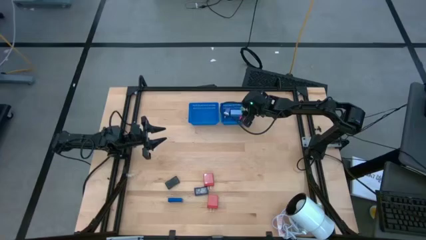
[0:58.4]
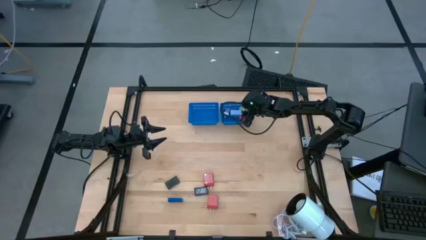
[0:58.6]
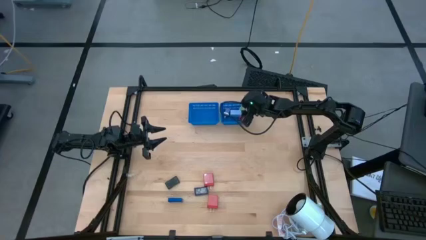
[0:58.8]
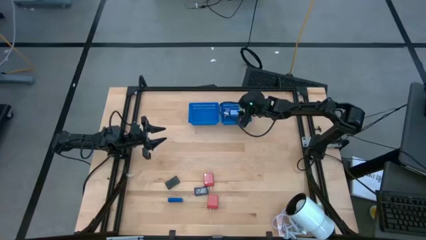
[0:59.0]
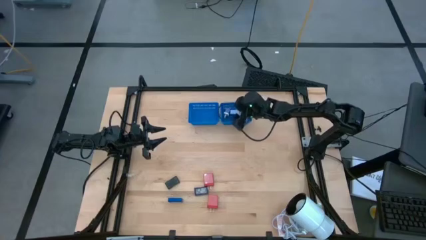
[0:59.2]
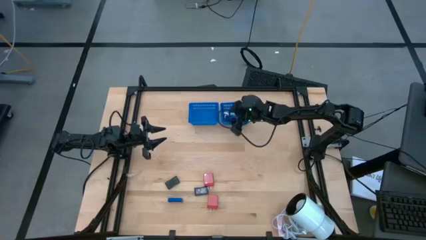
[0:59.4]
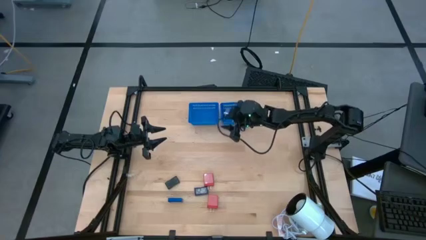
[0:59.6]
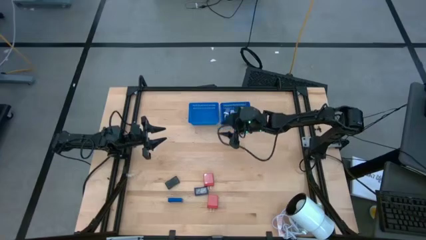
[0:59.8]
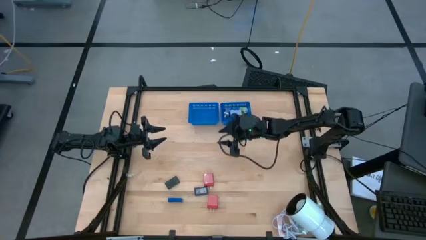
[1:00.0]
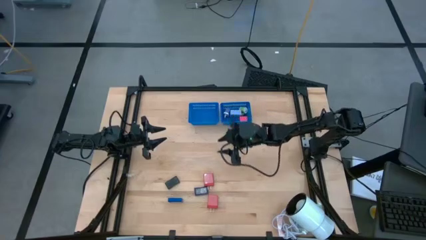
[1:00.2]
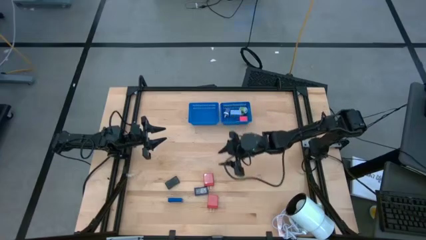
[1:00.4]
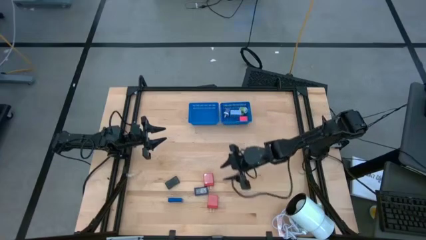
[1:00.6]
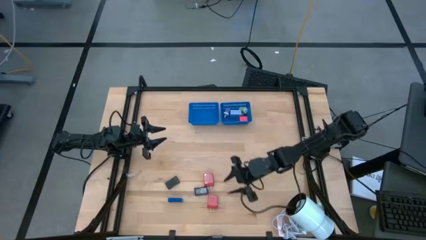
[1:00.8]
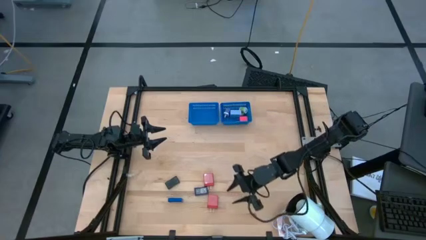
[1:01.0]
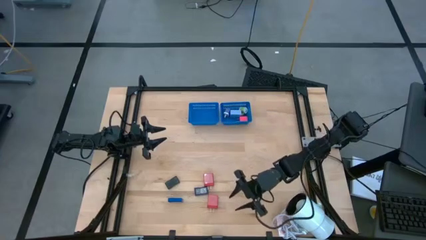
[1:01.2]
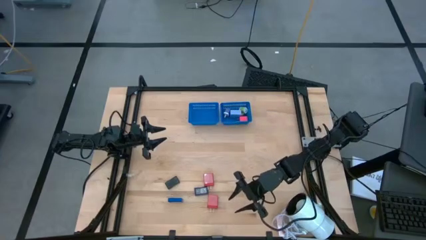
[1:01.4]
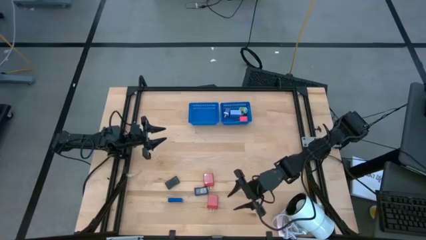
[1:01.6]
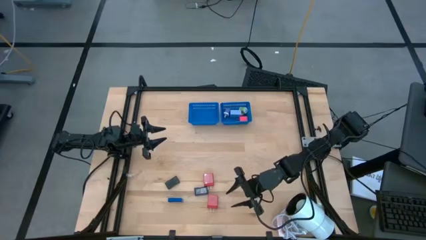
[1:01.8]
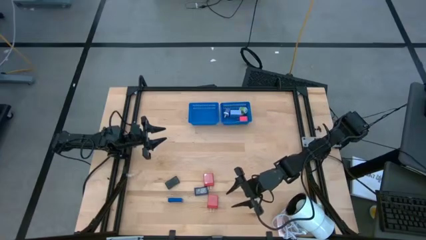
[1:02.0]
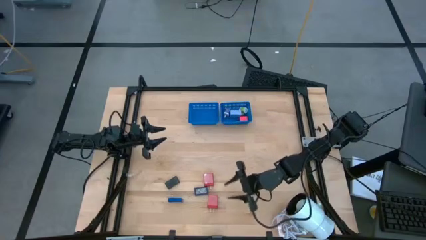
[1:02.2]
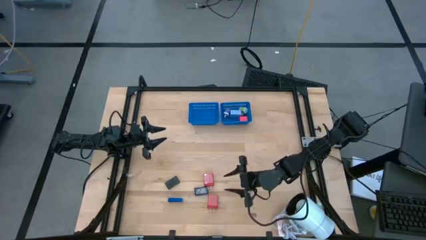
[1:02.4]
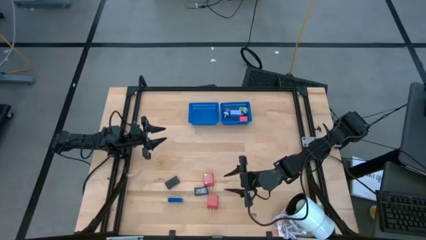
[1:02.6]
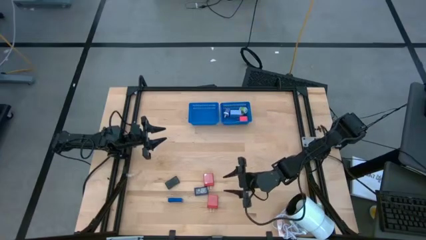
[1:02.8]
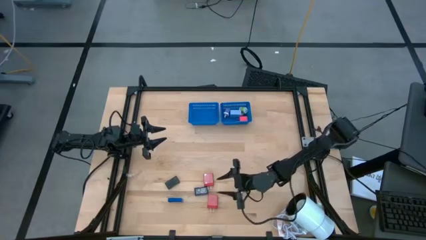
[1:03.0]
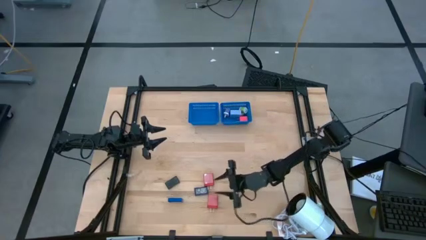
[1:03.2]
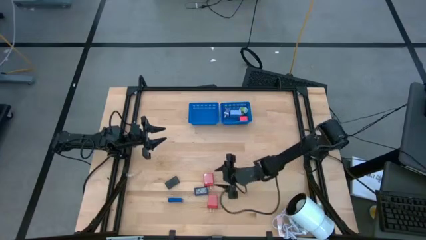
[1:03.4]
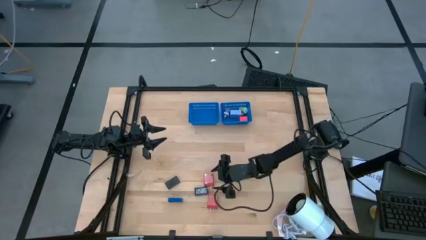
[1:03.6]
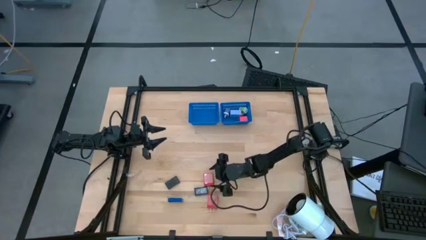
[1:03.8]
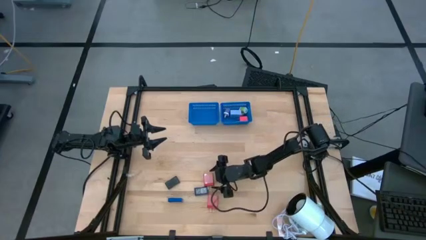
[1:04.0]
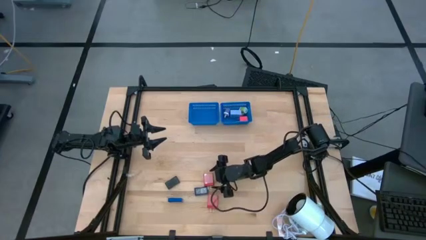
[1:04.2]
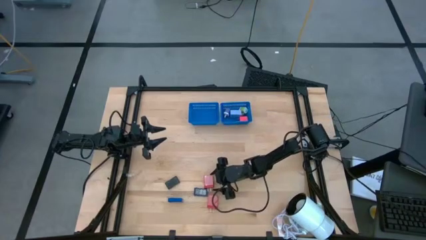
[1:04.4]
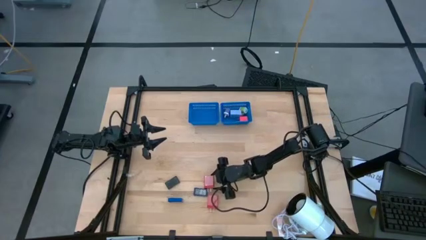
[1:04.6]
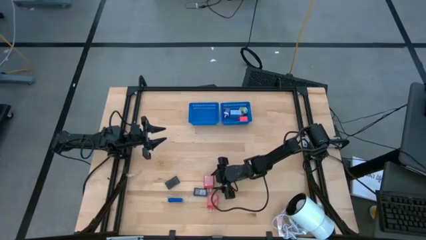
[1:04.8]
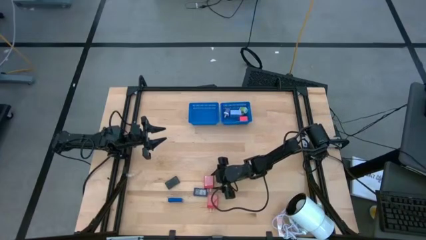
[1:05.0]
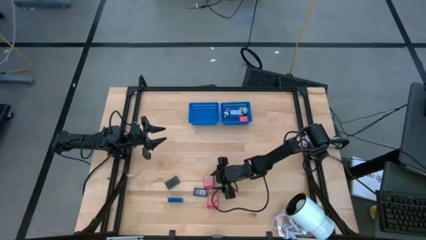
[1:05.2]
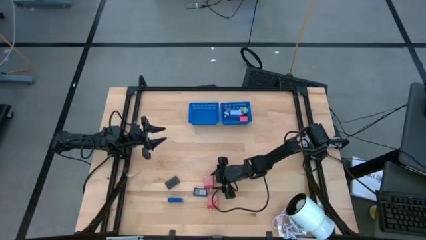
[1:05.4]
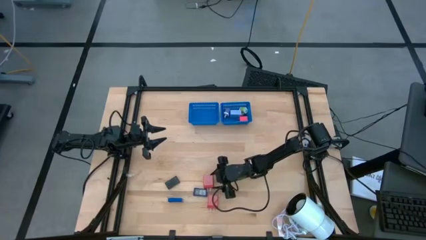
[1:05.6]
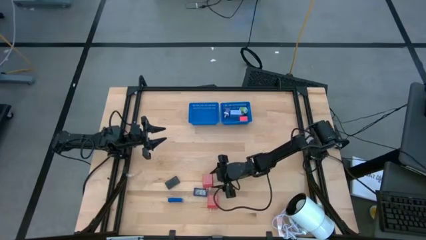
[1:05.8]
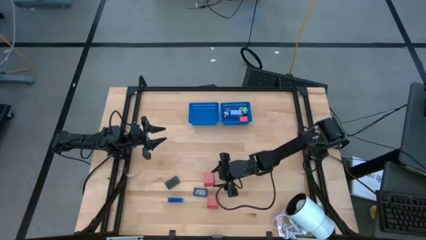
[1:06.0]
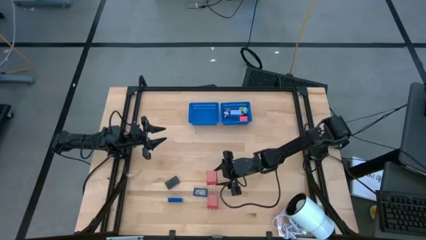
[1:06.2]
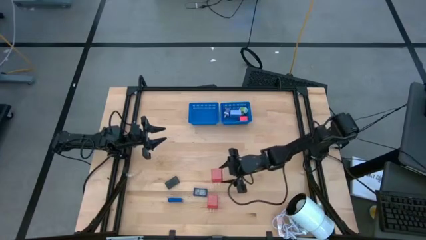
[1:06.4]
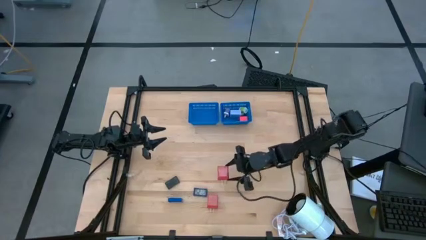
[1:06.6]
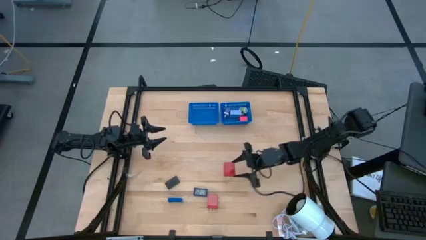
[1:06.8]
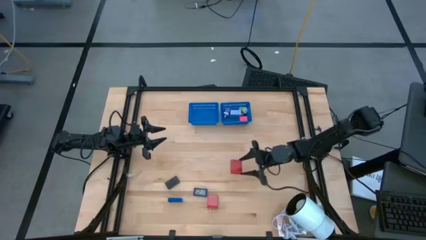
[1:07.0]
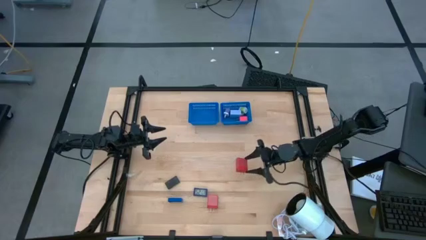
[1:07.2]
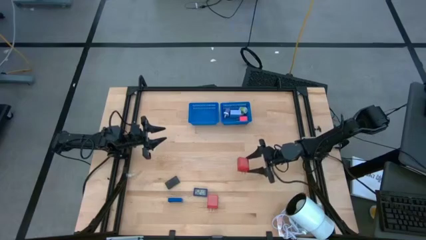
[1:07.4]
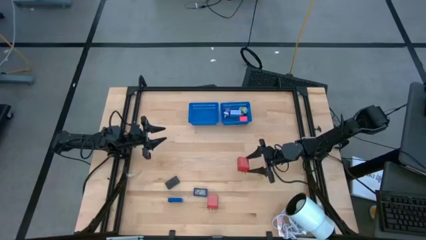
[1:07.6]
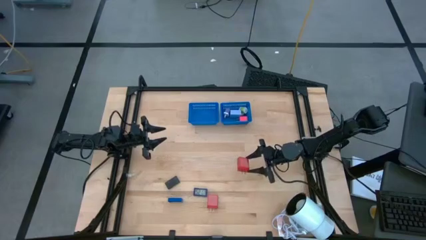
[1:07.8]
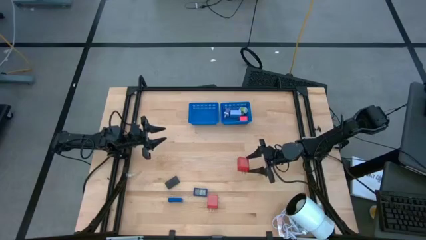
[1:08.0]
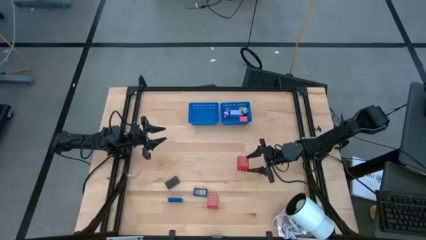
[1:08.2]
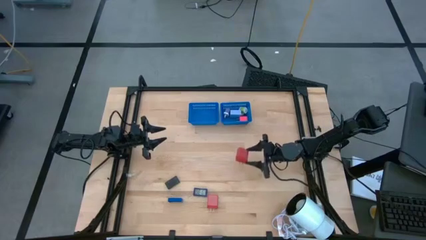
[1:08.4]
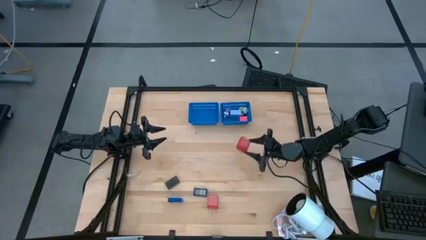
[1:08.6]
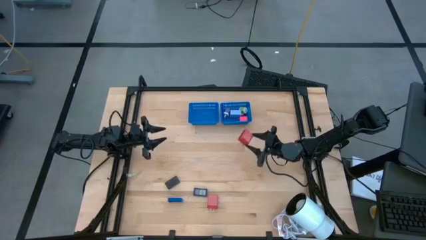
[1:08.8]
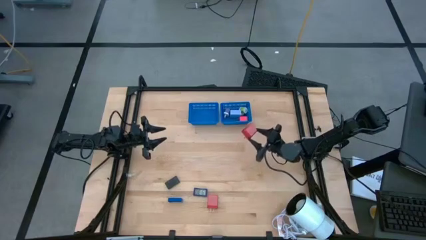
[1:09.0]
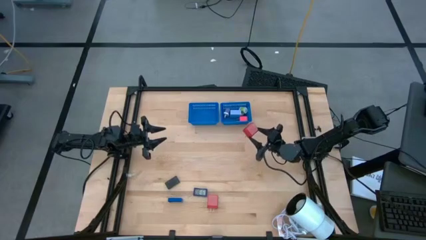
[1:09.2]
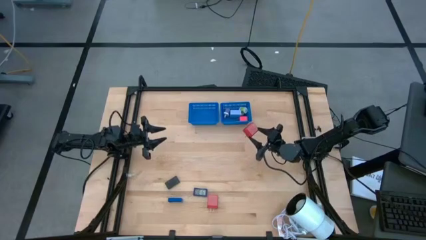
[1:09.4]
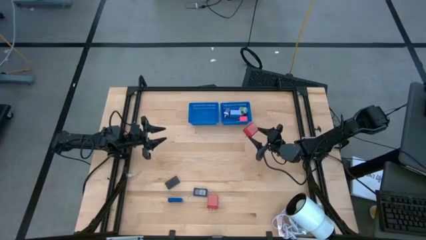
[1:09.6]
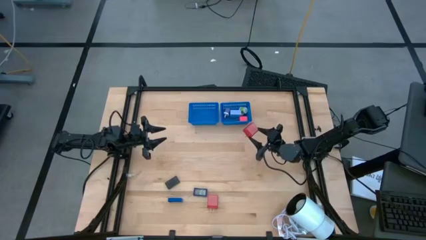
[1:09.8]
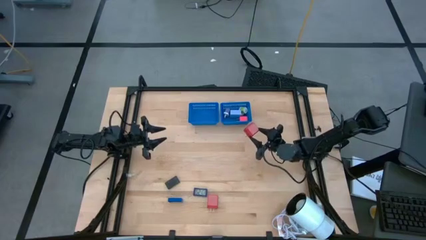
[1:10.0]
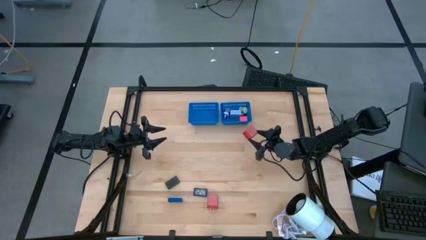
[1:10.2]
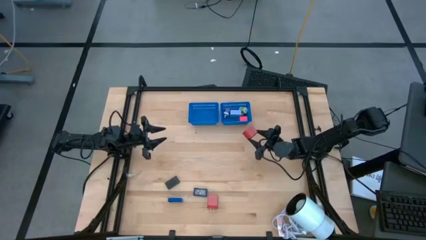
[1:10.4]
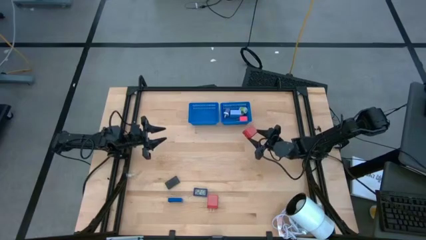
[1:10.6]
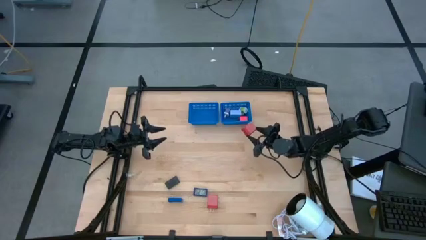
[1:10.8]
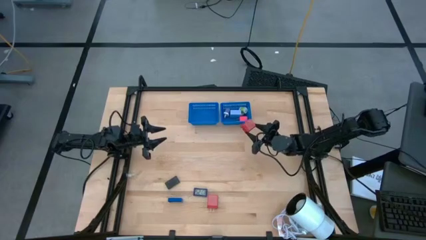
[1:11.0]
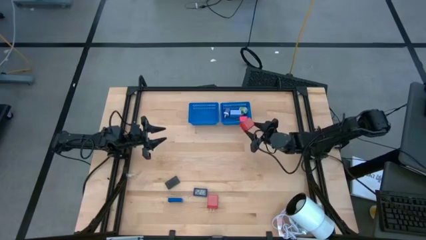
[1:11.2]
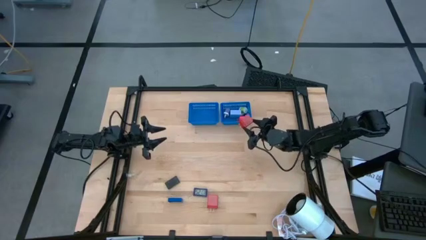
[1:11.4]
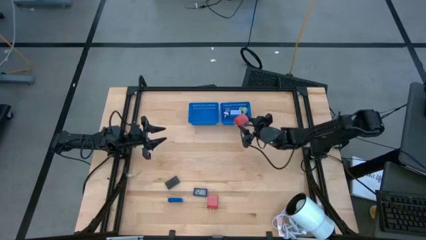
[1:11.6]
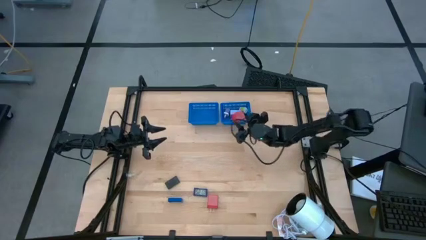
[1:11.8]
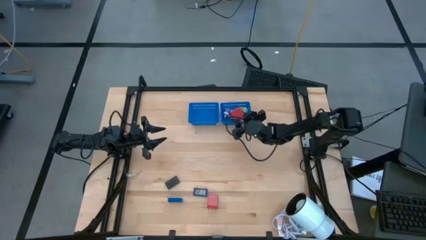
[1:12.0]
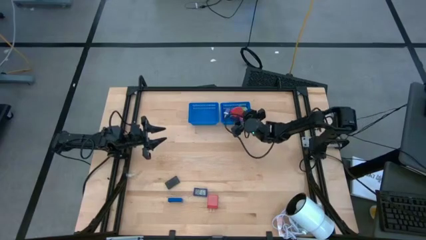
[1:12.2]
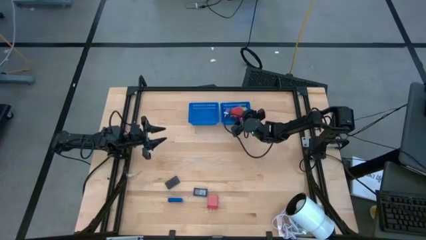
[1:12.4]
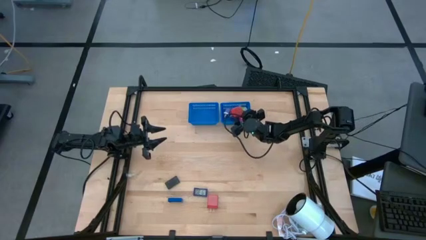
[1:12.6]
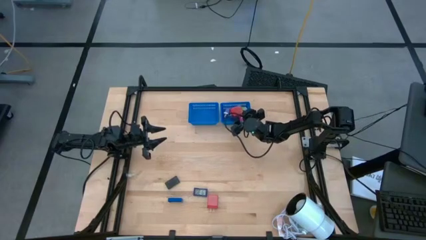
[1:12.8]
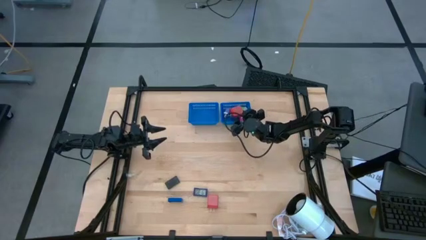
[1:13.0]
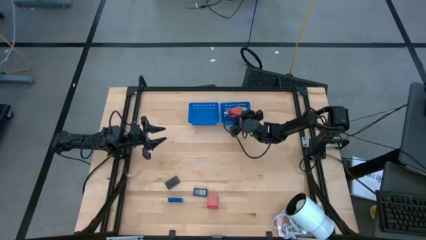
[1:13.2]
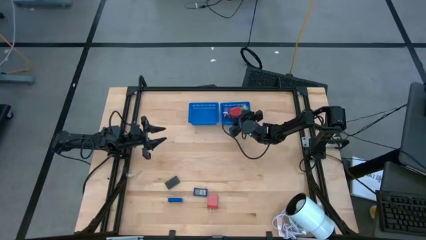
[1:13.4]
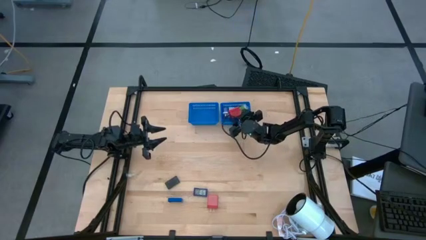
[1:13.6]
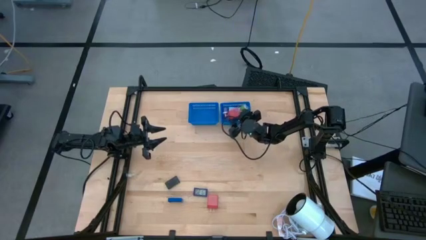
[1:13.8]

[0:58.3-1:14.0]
Task: Pick & Place Office items
Put the top red charger adapter into the right blue bin

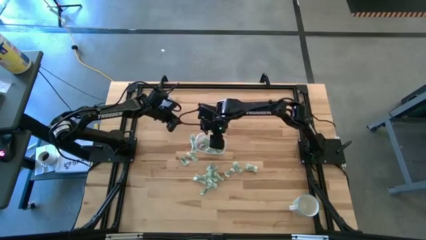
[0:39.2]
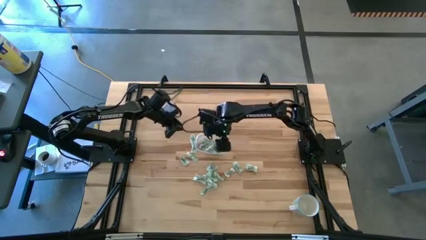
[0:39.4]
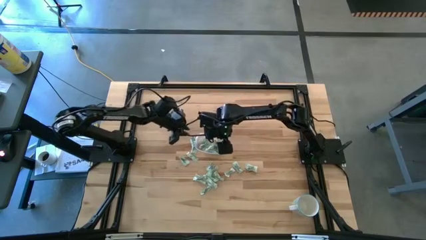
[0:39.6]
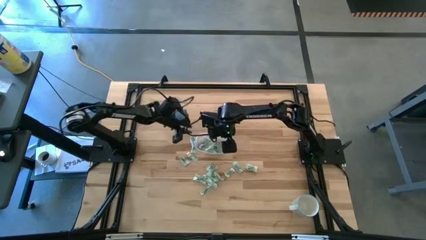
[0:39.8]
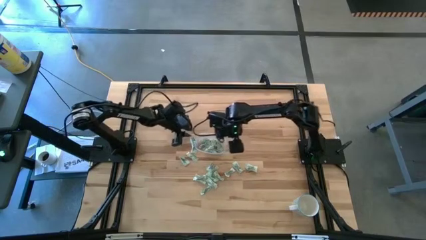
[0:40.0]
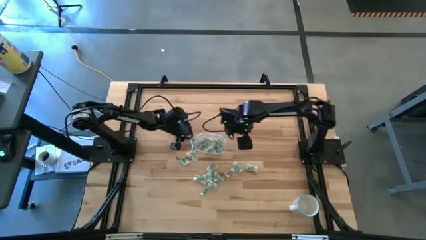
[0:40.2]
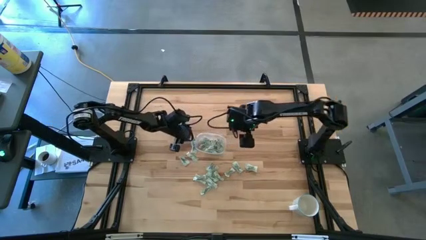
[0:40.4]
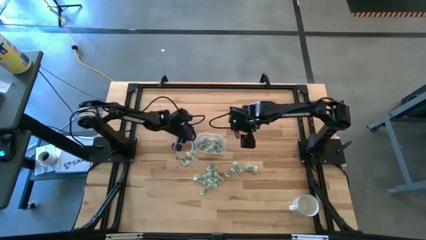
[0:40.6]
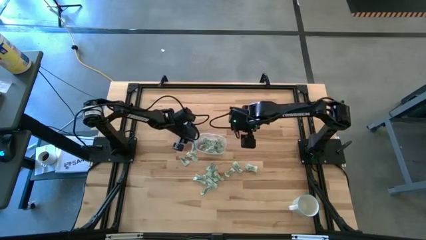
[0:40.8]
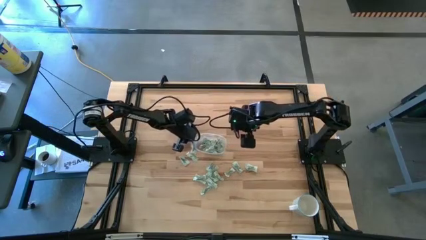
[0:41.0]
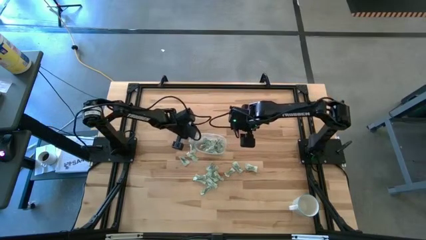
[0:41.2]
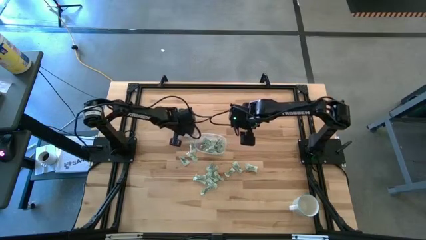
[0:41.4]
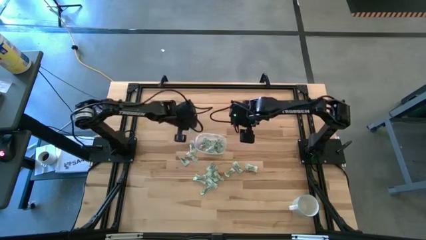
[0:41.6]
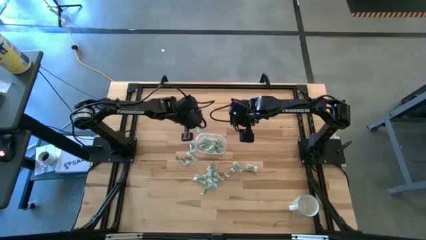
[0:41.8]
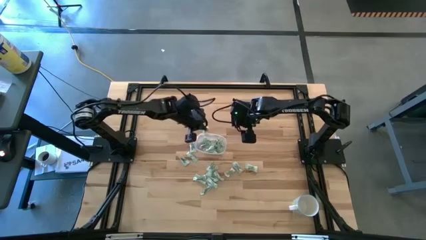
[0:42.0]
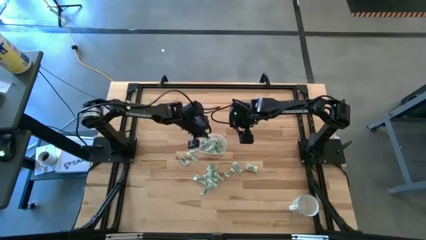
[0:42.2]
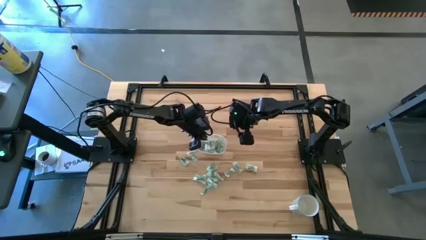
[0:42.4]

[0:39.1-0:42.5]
Task: Pick and place Stevia / Truvia into bins
Put the stevia packet into the transparent container
